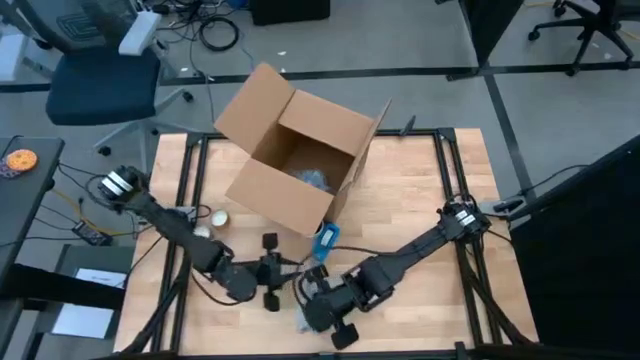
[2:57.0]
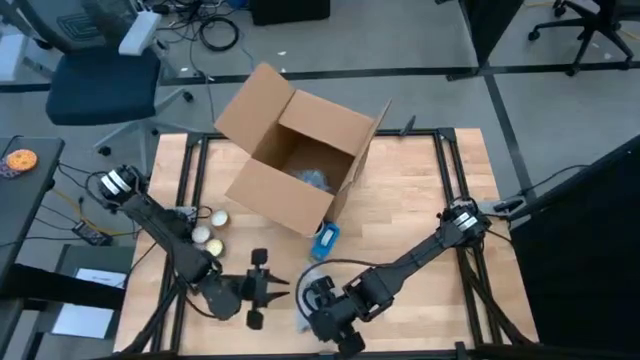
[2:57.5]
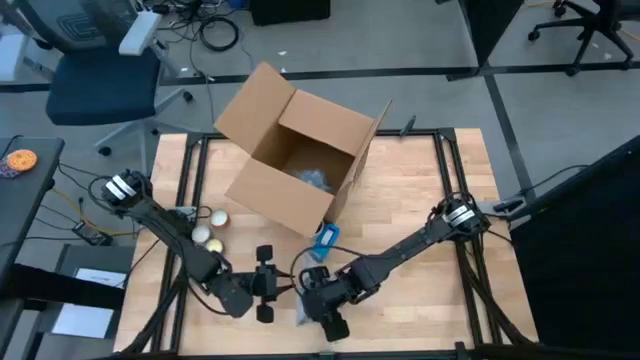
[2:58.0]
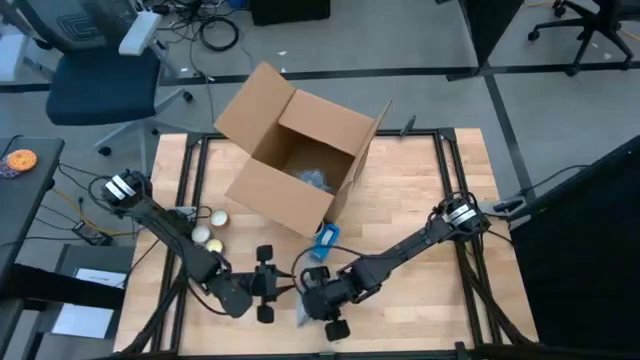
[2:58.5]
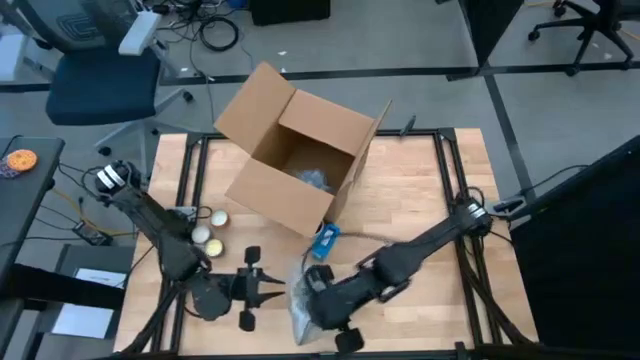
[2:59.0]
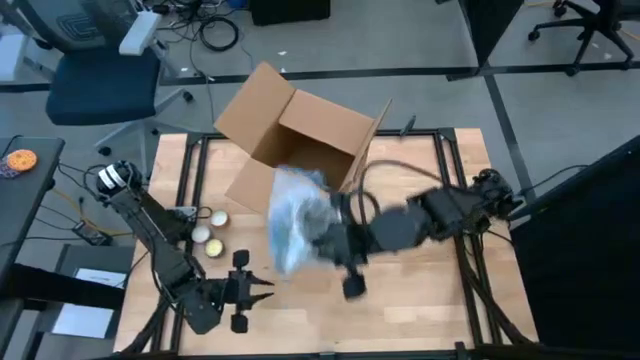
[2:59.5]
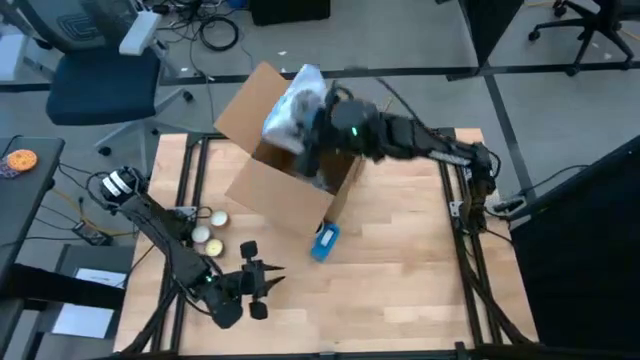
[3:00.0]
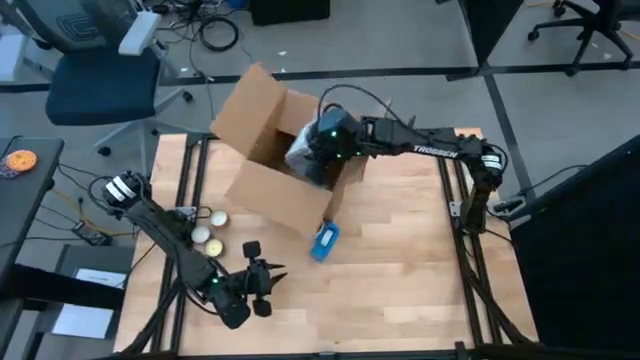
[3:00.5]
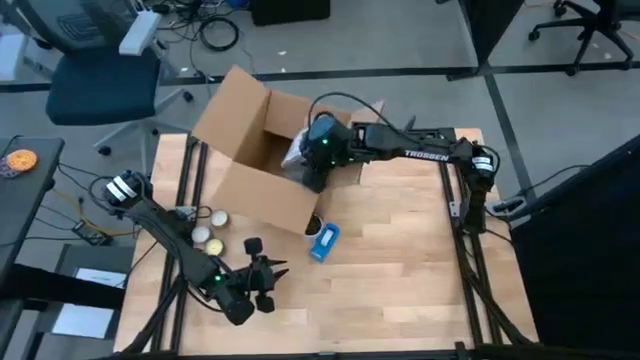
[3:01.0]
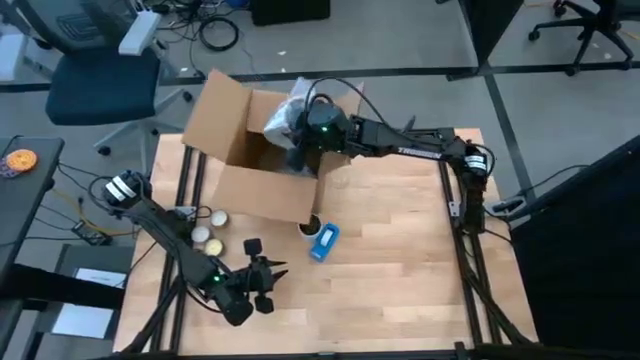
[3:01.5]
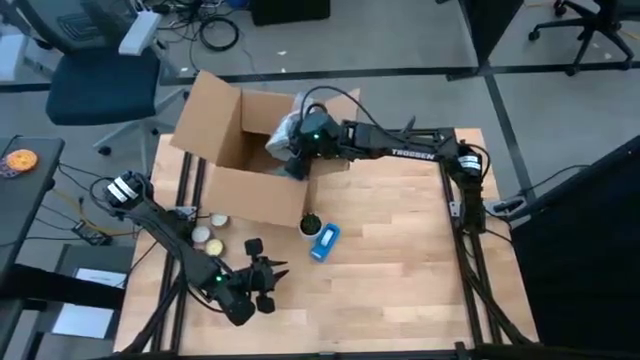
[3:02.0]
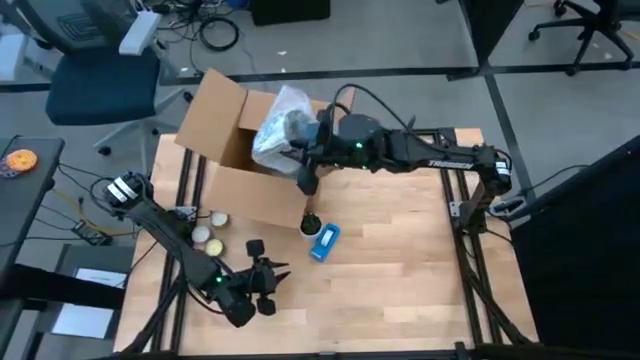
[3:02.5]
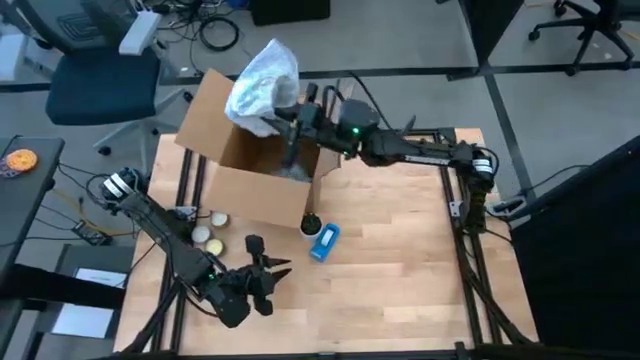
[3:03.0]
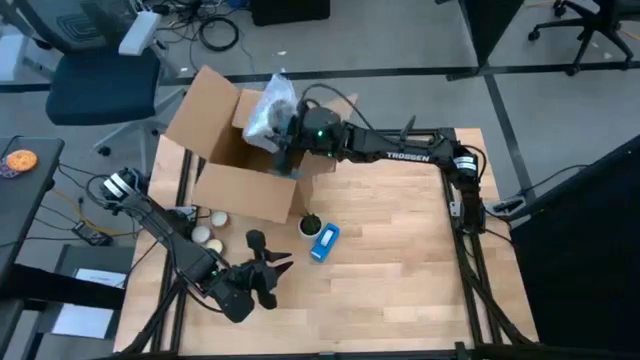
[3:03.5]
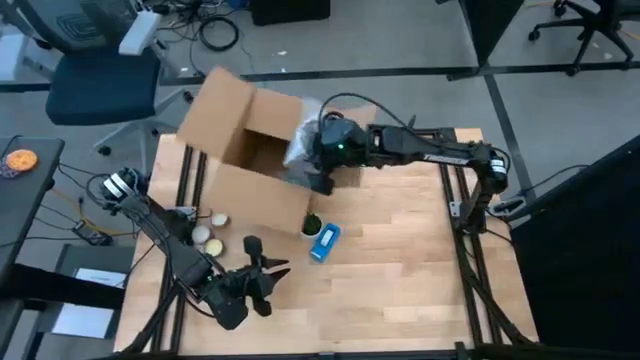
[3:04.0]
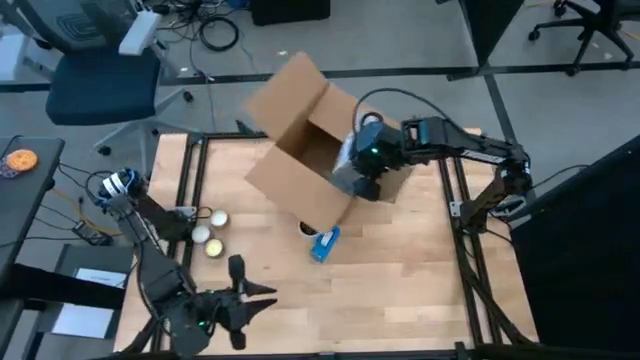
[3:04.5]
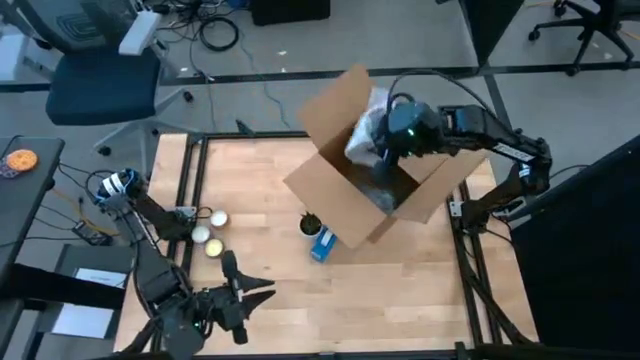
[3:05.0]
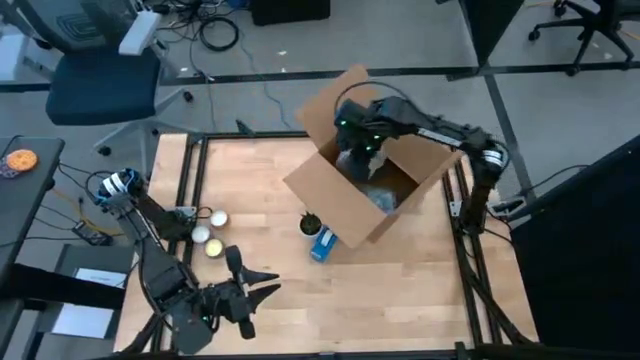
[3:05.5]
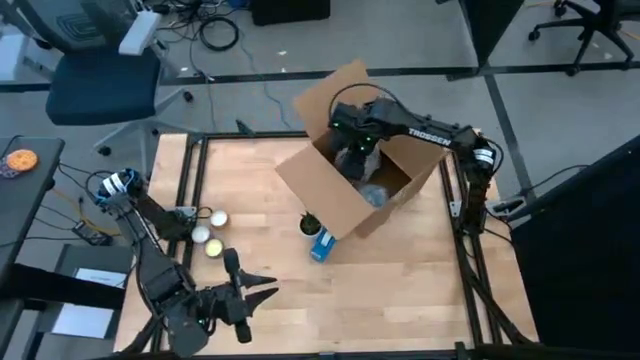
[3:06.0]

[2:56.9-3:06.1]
Task: wrap mug
Put the wrapped brown mug into the cardboard box on the table

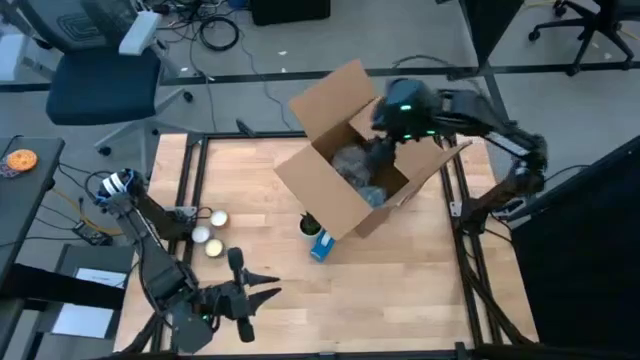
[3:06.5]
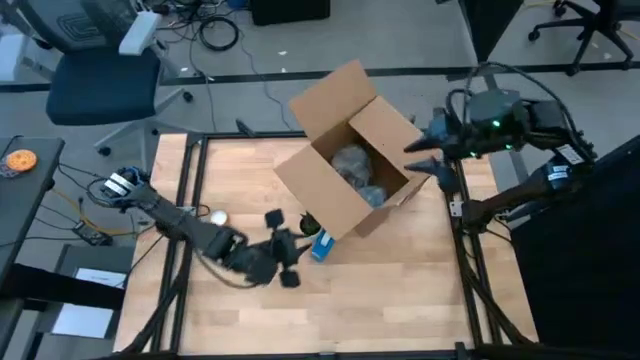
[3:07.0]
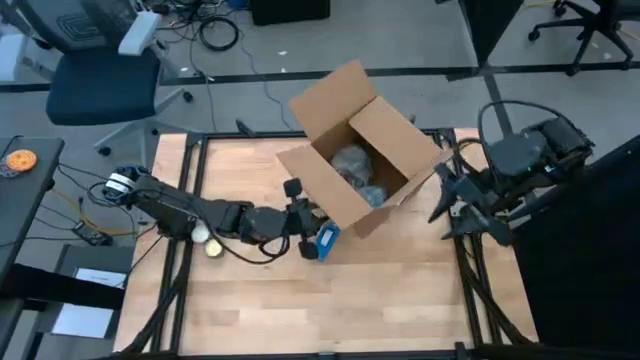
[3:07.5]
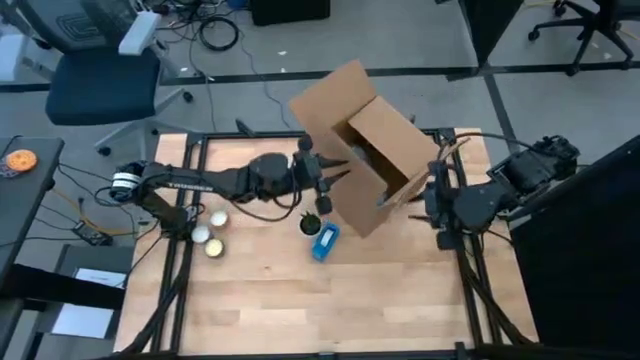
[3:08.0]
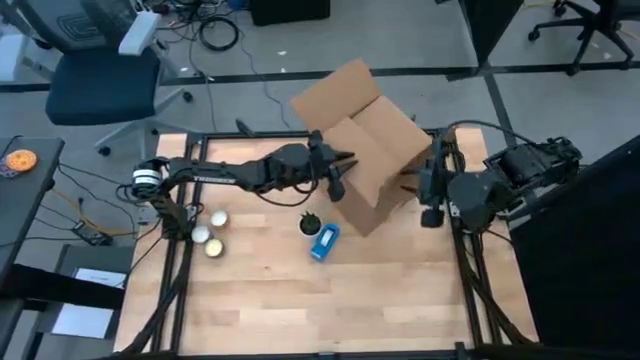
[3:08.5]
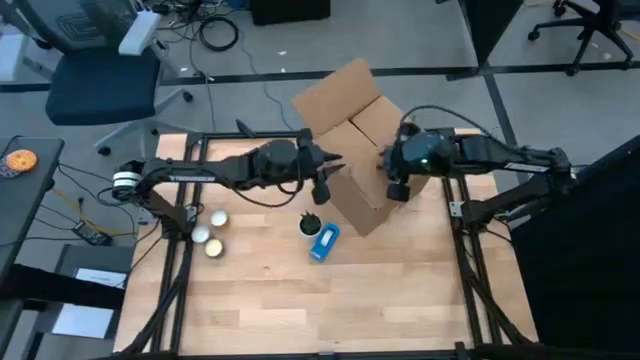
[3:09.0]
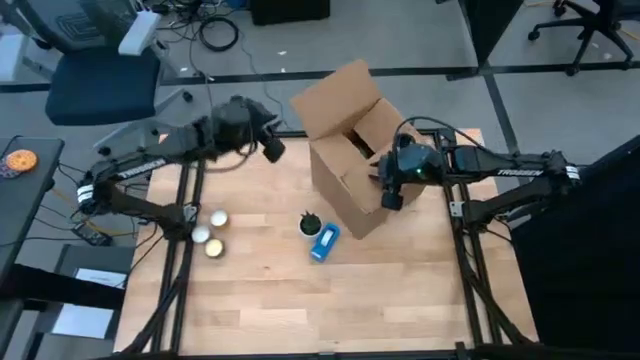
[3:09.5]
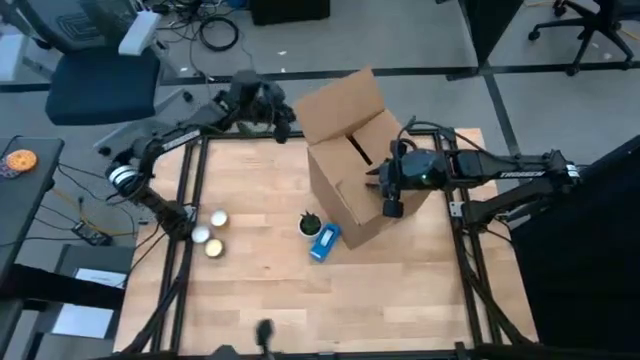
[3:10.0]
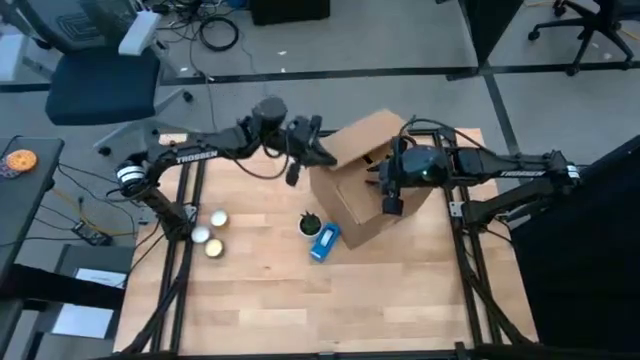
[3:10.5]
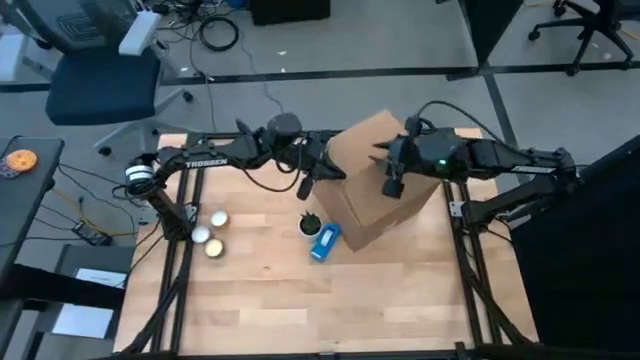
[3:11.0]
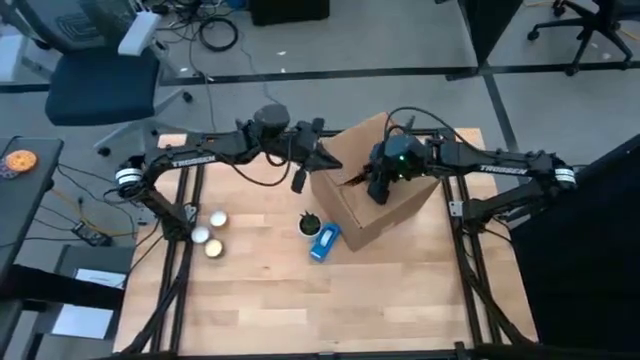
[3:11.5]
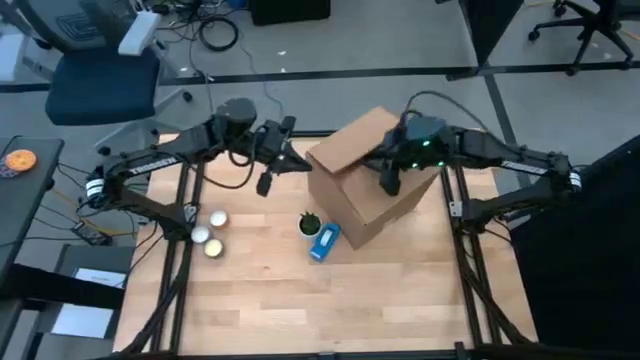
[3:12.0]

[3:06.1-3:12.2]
Close the cardboard box on the table

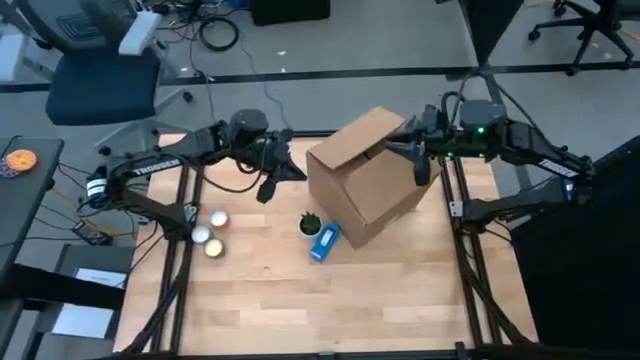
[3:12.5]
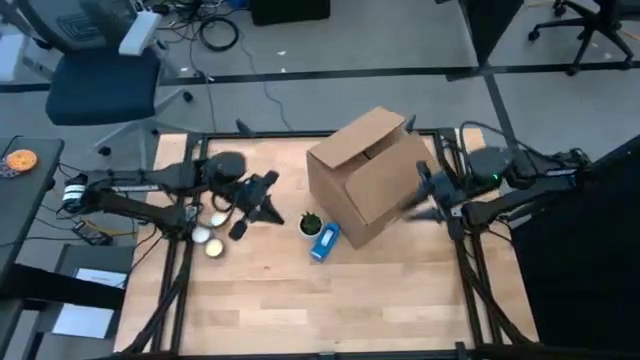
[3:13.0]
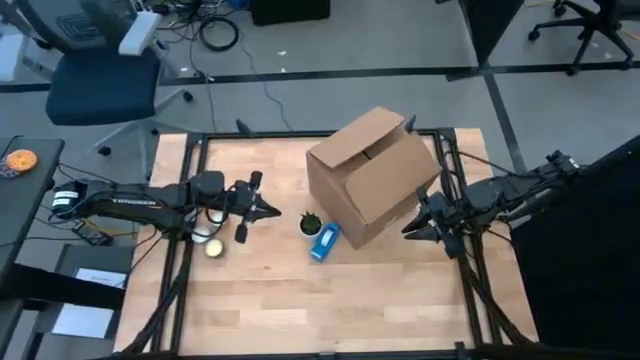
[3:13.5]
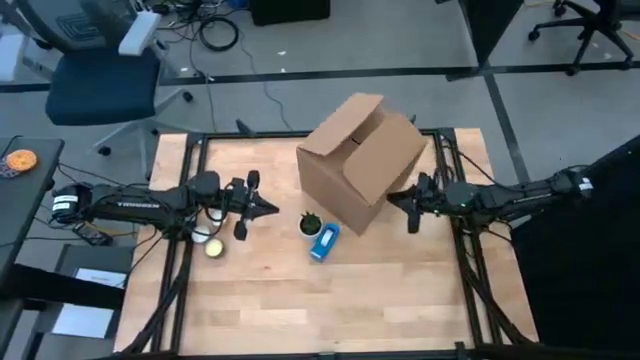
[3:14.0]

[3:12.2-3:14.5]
Adjust the cardboard box on the table

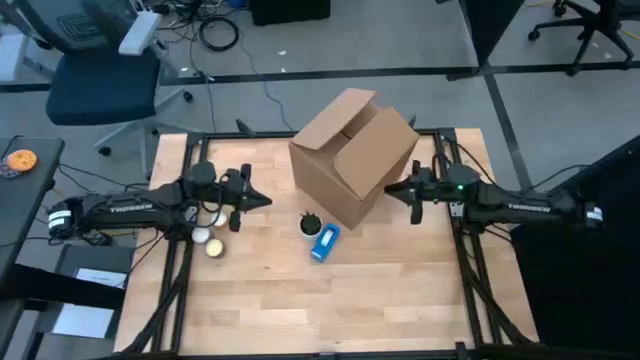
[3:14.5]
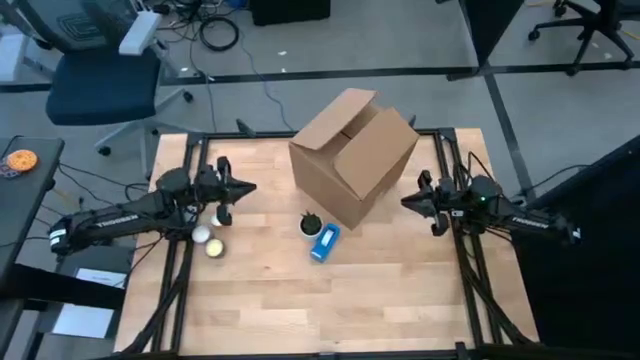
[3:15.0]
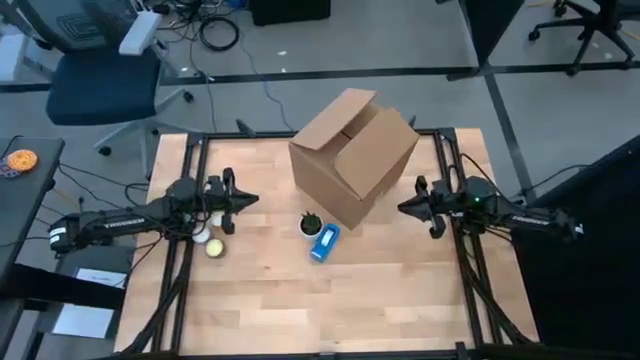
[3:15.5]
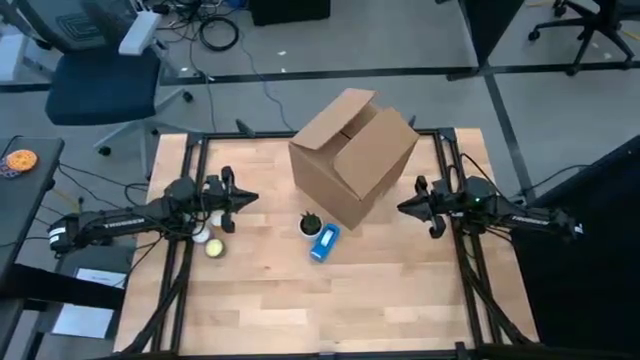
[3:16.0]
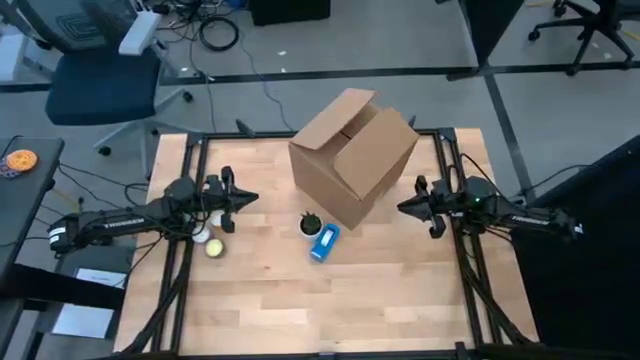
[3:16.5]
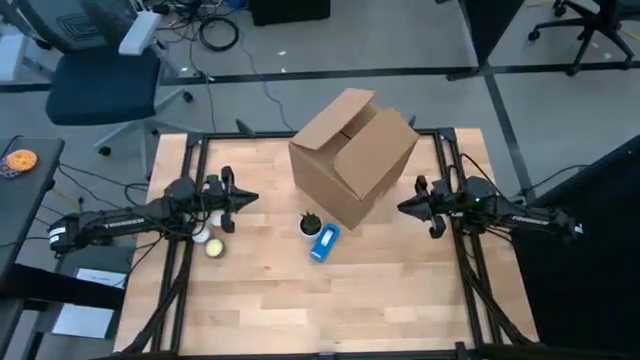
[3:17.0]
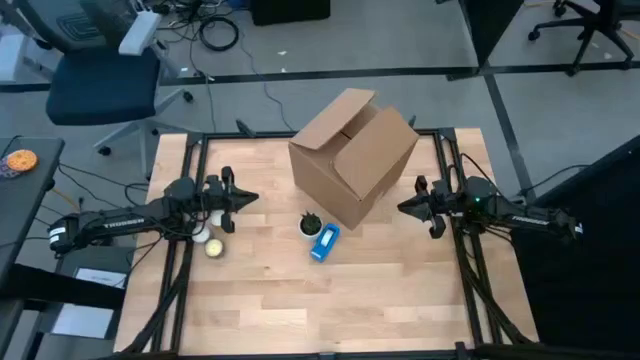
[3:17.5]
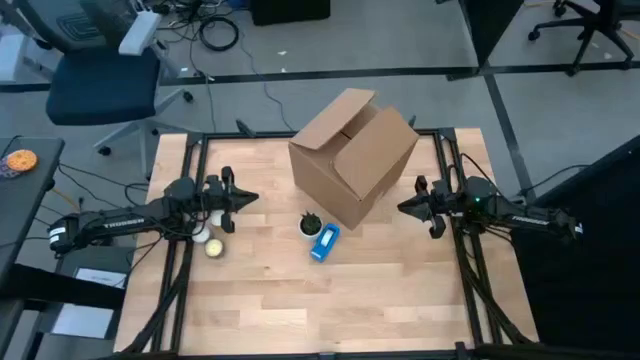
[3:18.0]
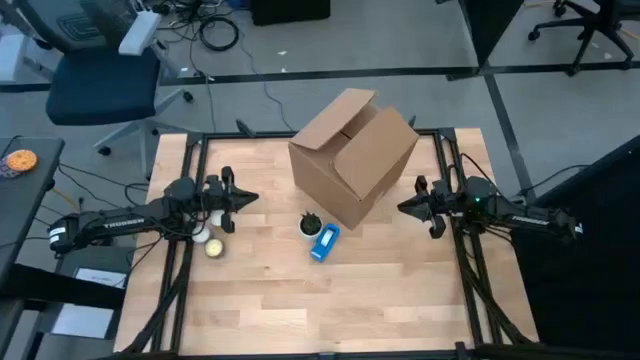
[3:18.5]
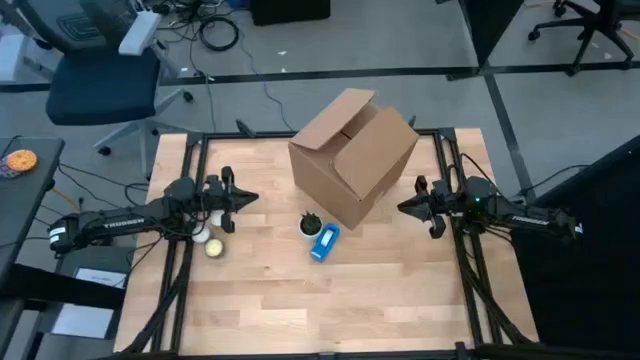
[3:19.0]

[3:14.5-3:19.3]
Return to Home Position
